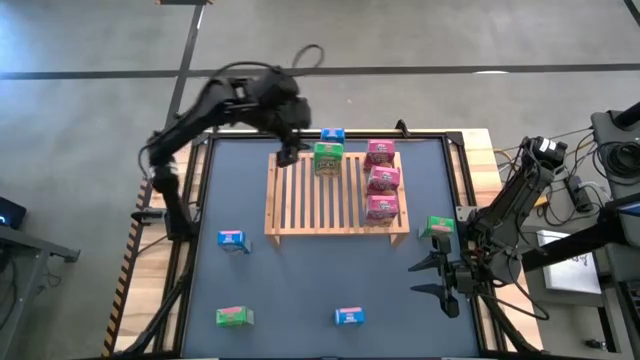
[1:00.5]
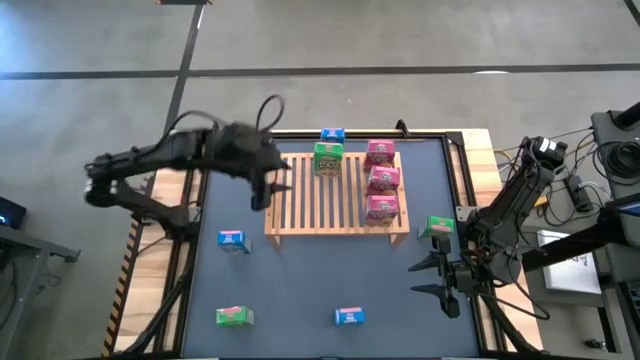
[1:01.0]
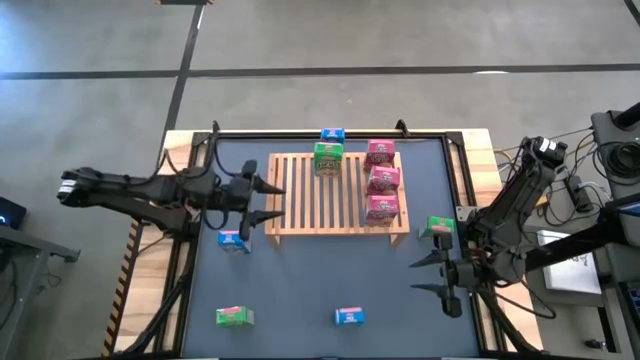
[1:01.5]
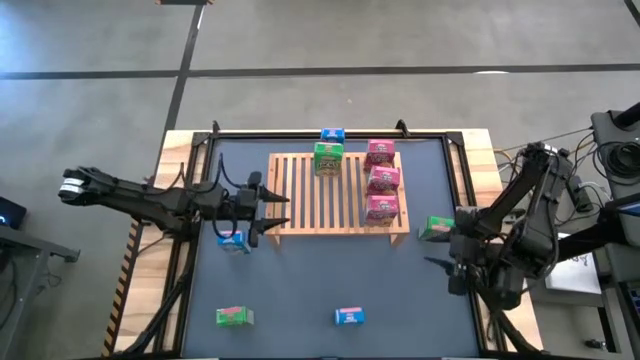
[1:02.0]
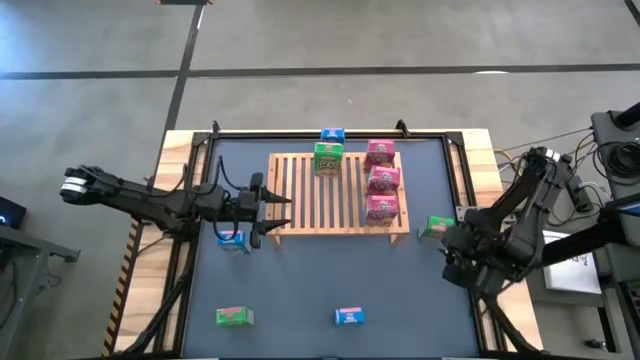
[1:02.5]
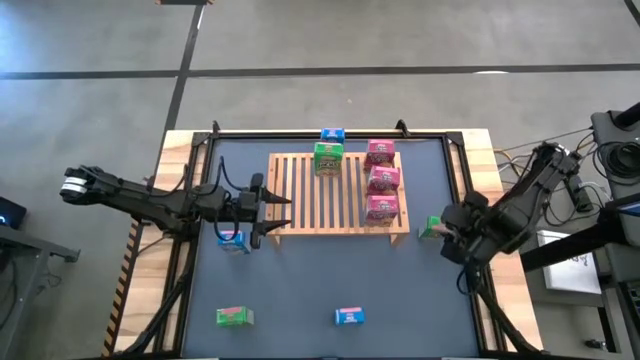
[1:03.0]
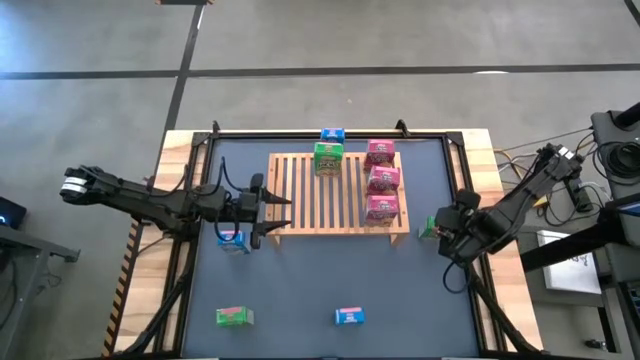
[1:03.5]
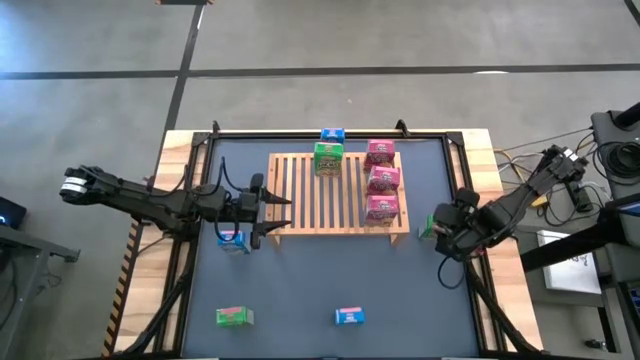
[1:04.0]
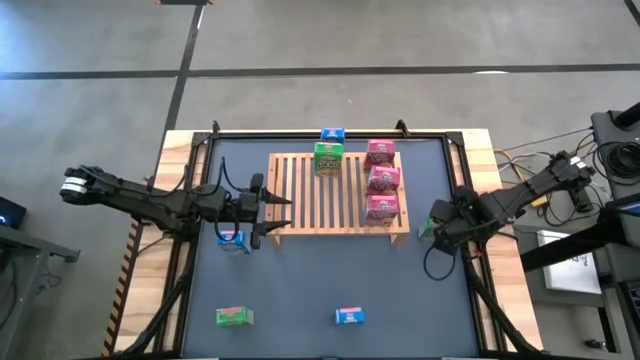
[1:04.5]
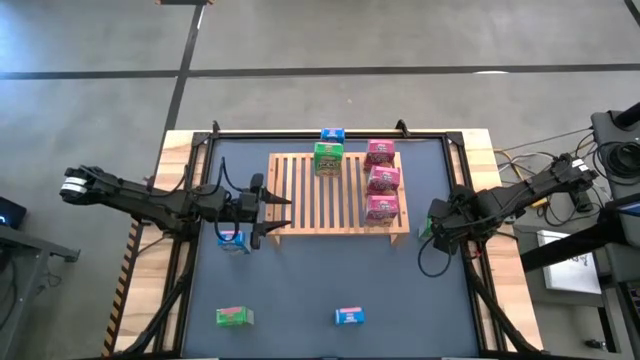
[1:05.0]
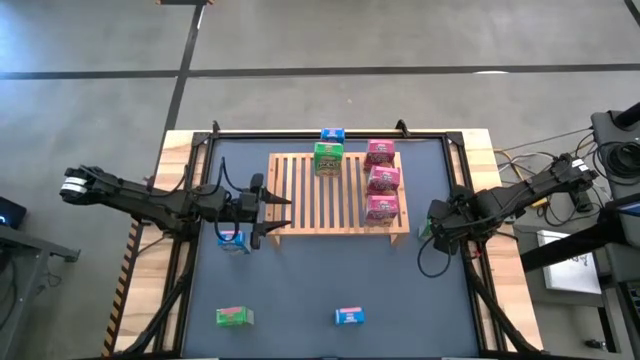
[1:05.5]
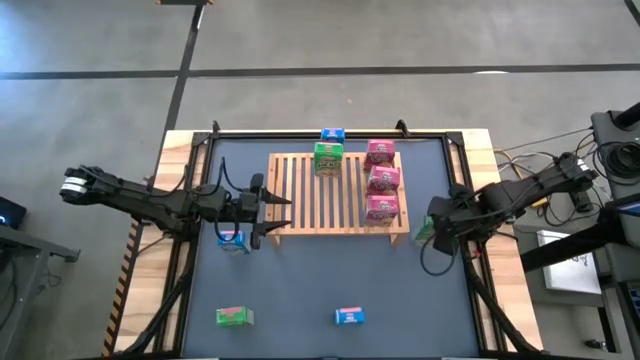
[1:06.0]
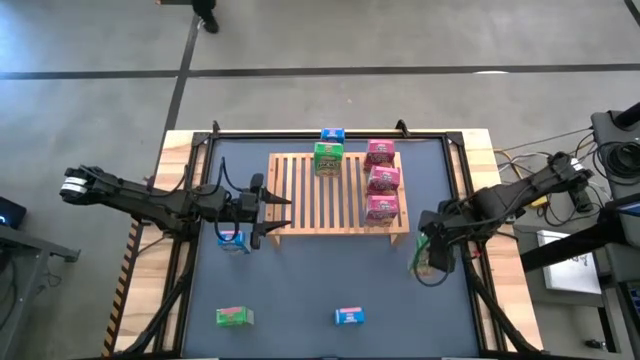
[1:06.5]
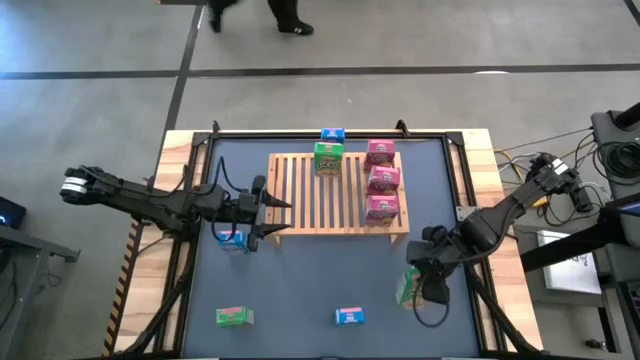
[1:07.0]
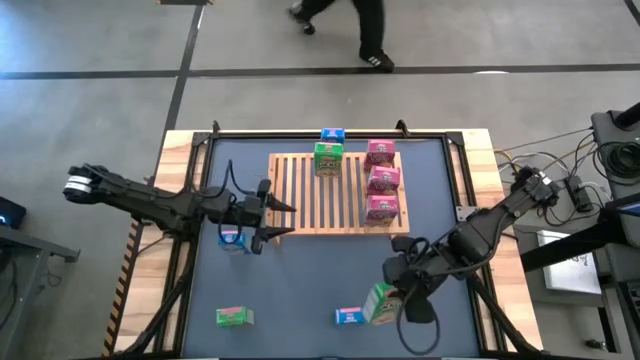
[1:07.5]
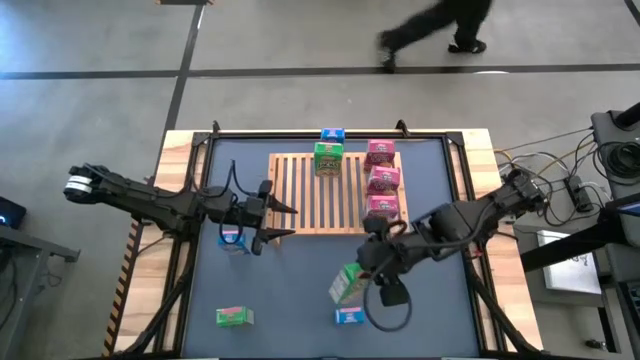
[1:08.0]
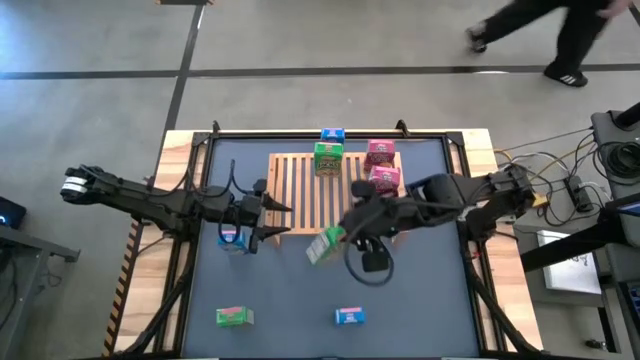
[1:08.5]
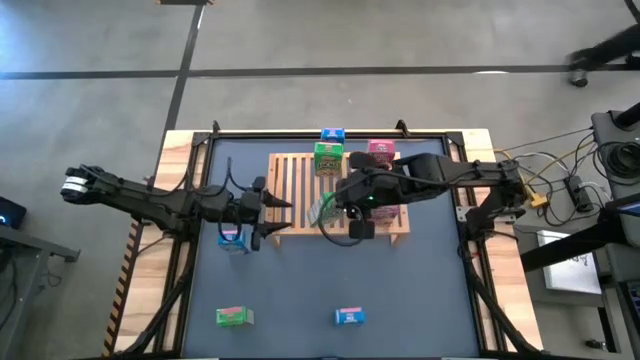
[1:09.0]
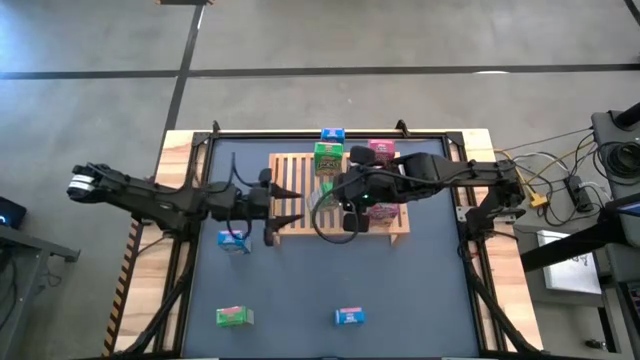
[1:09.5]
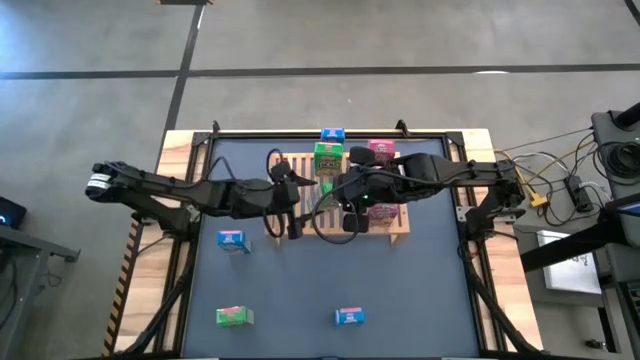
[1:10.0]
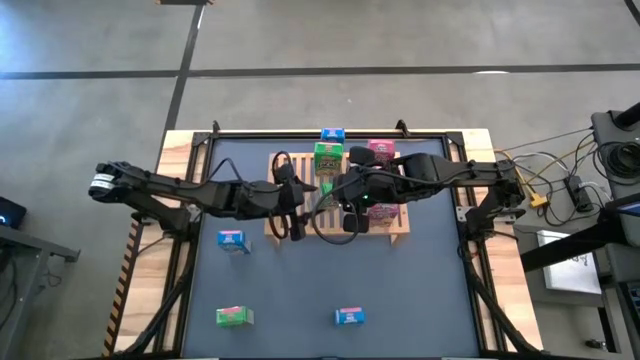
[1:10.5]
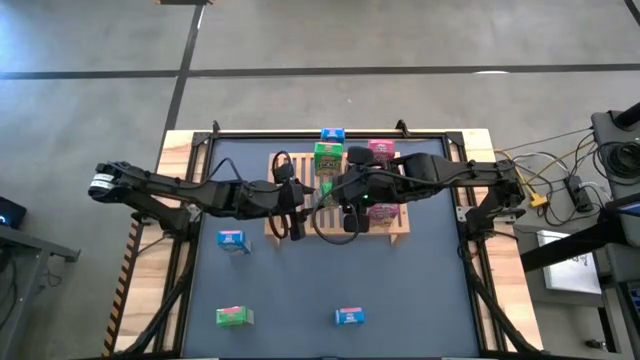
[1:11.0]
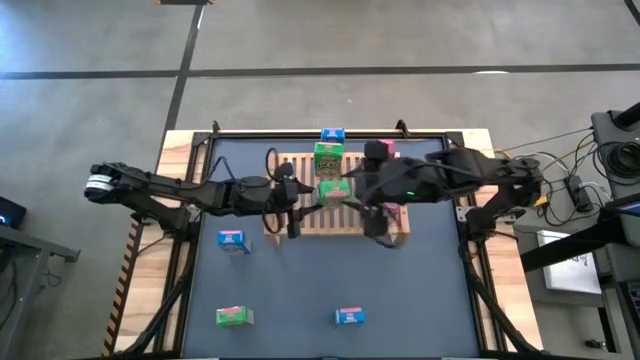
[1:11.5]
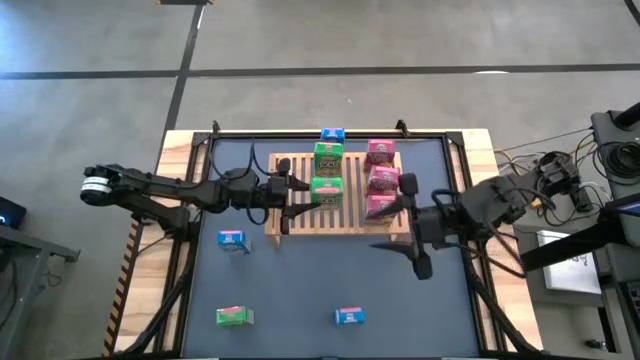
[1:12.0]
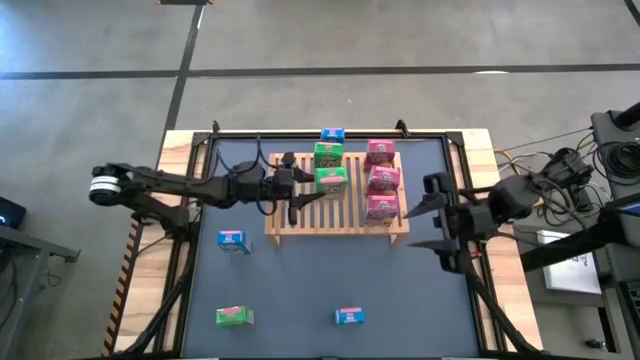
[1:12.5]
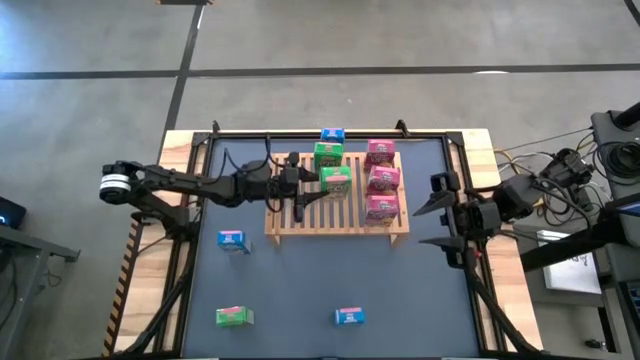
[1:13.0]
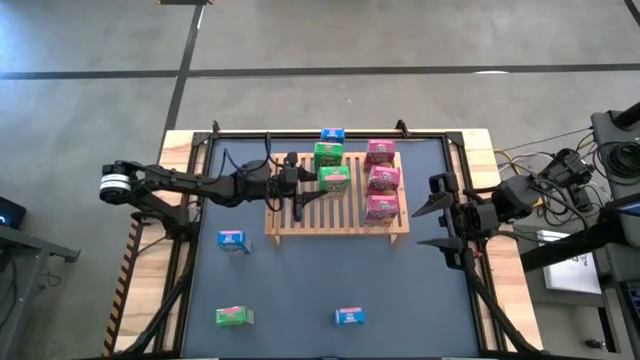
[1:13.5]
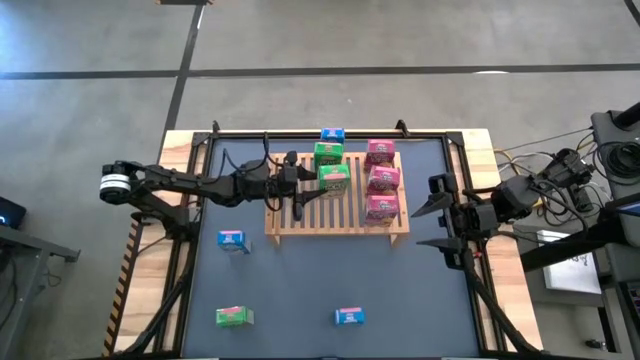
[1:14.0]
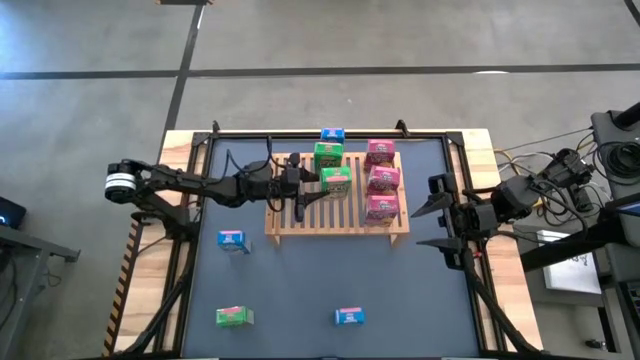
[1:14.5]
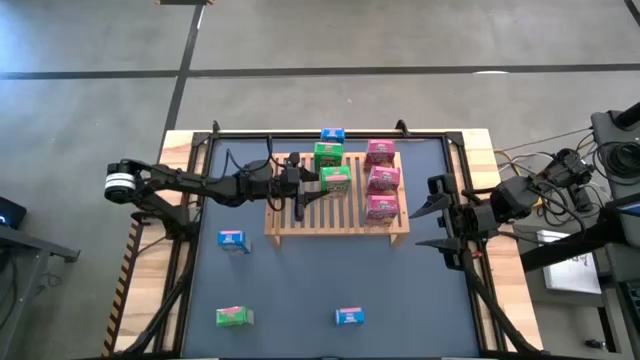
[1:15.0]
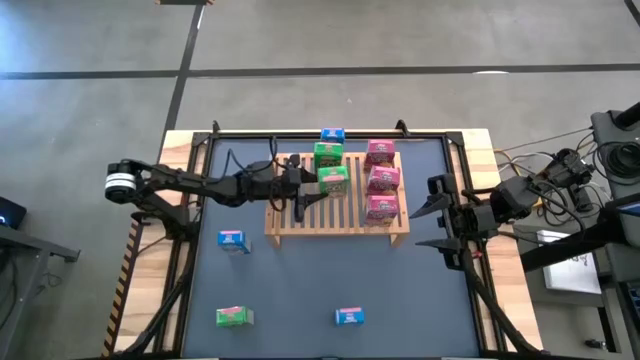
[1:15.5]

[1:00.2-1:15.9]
Task: Stack cereal on shelf
Put the top green cereal box on the shelf aligned with the other green cereal box

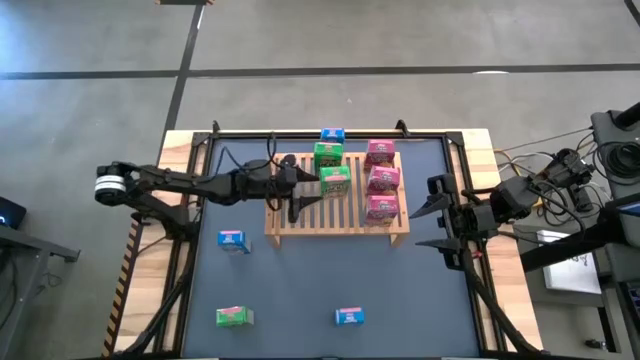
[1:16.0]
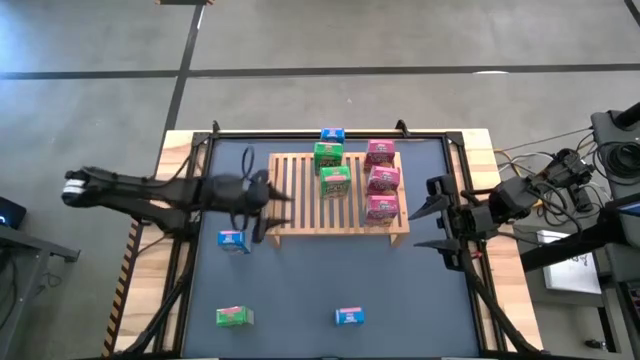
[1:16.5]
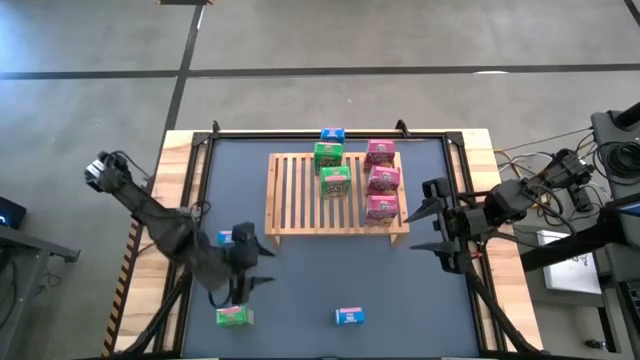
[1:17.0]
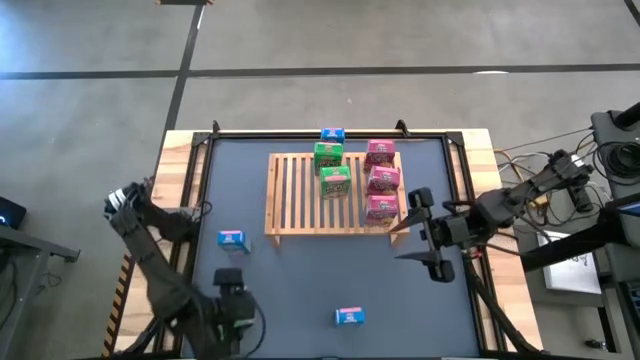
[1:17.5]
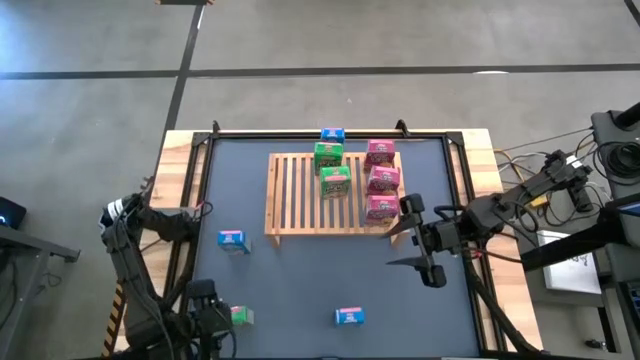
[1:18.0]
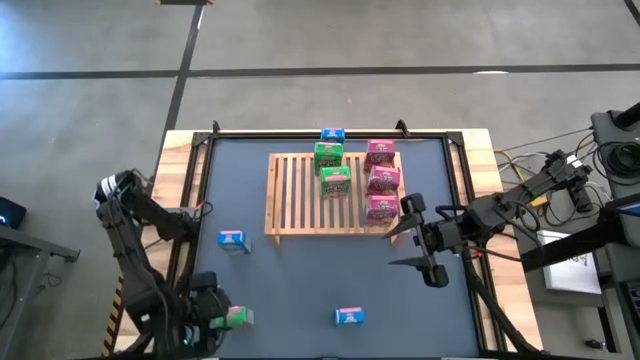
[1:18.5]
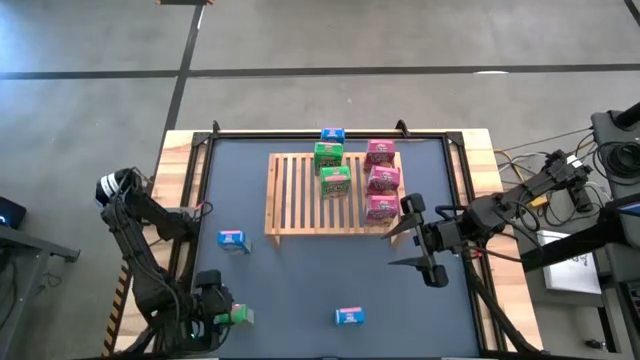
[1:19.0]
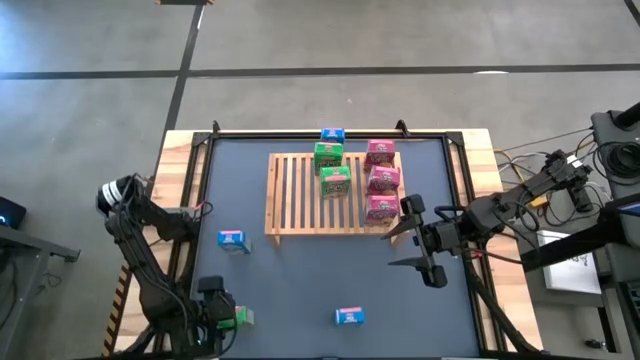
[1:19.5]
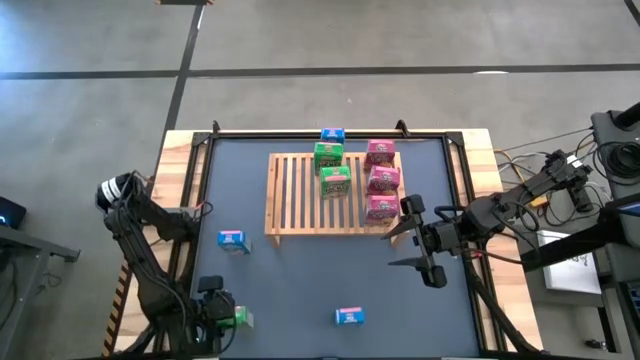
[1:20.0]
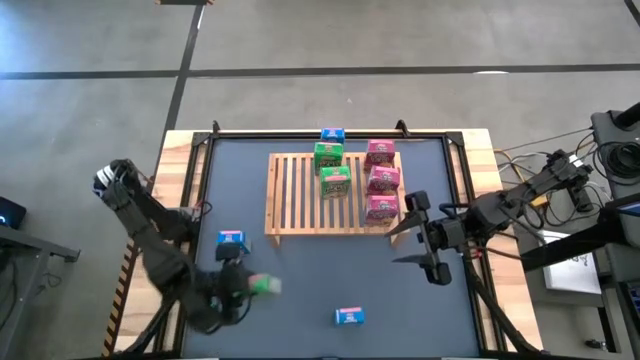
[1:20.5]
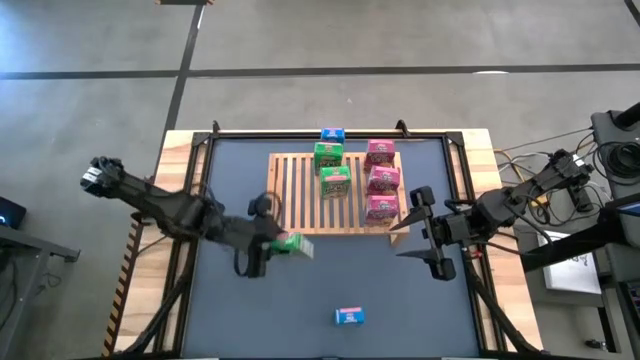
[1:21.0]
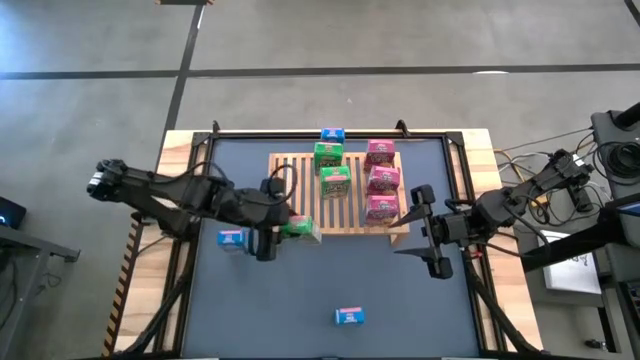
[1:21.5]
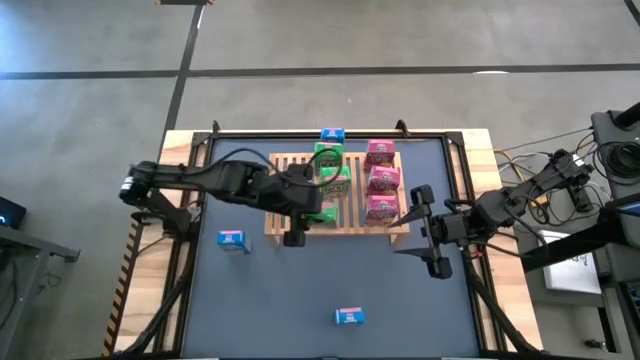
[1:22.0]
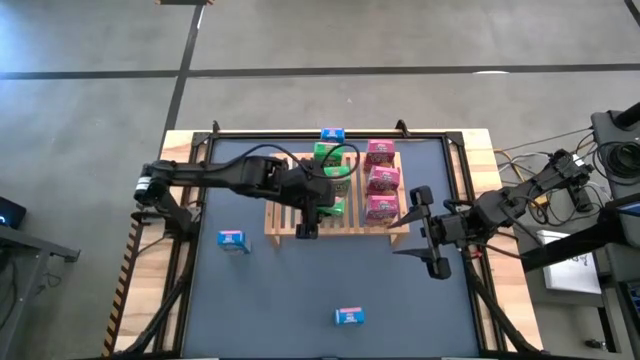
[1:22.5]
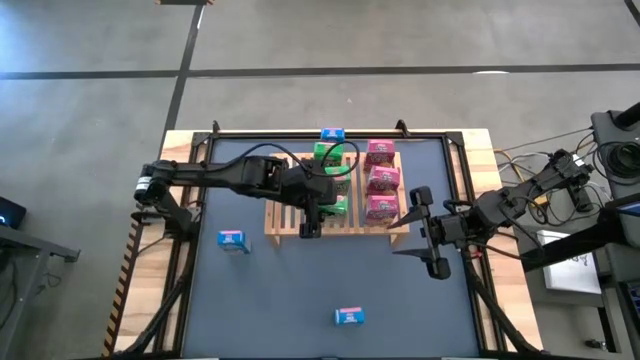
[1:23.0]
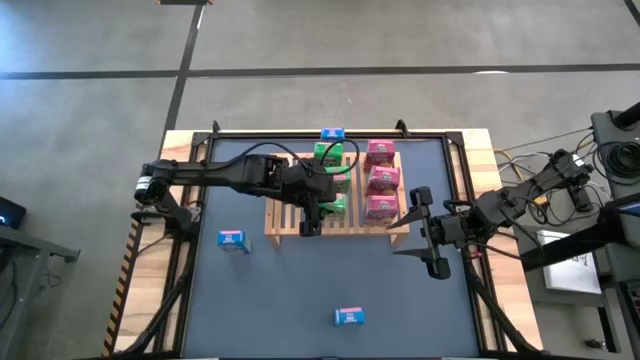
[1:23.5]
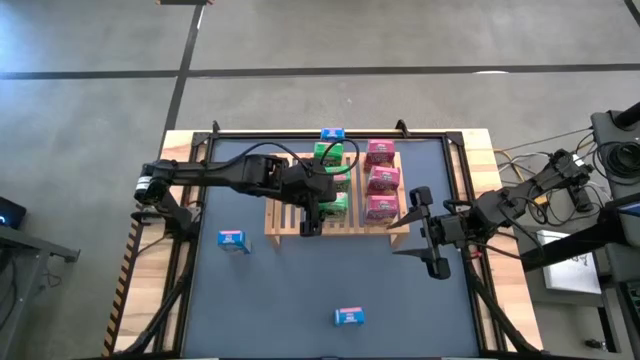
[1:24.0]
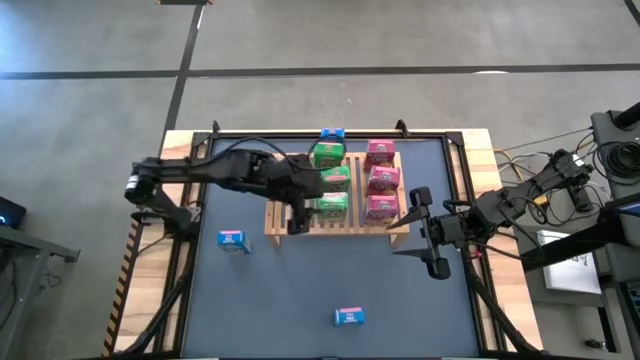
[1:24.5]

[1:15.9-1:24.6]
Put the green cereal box on the shelf aligned with the other green cereal boxes
